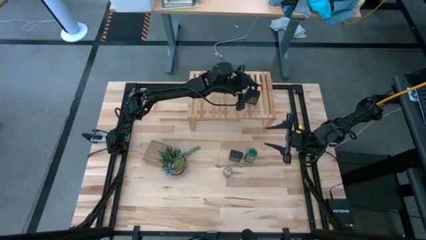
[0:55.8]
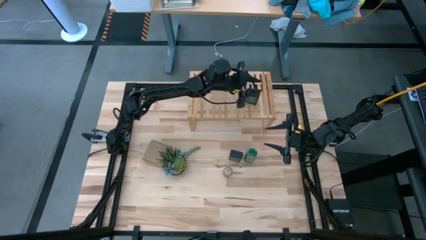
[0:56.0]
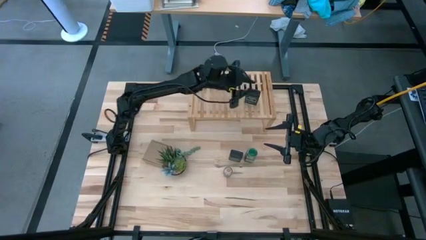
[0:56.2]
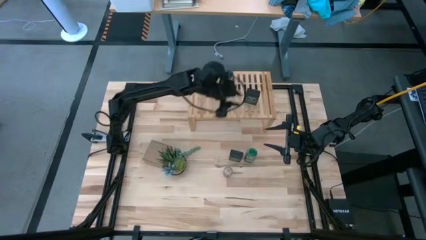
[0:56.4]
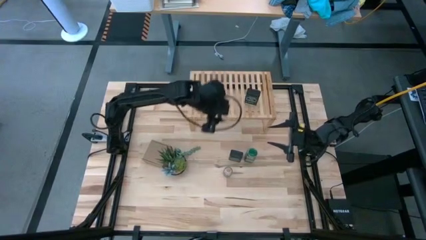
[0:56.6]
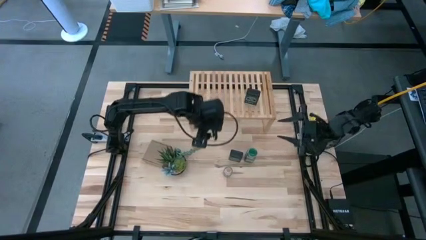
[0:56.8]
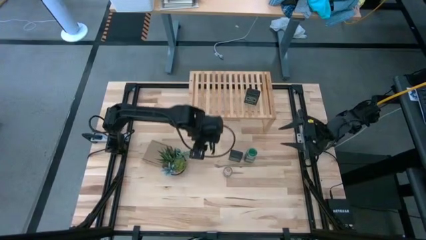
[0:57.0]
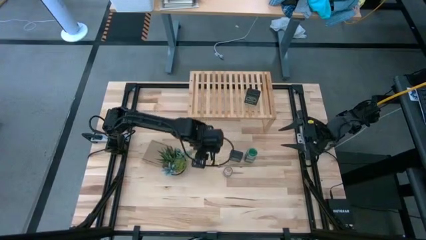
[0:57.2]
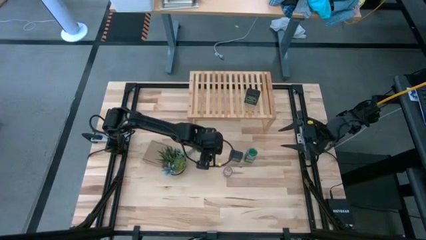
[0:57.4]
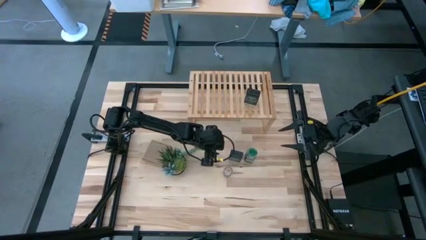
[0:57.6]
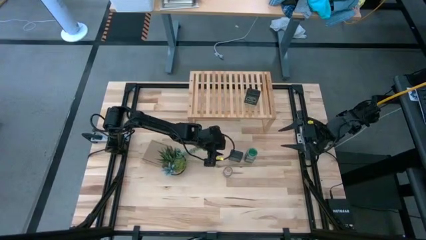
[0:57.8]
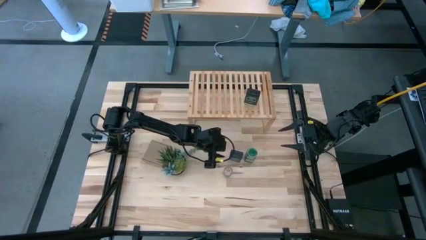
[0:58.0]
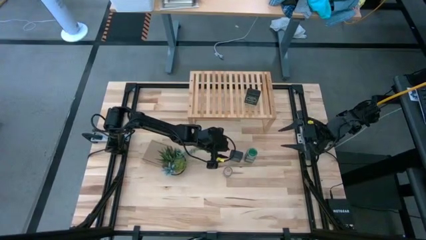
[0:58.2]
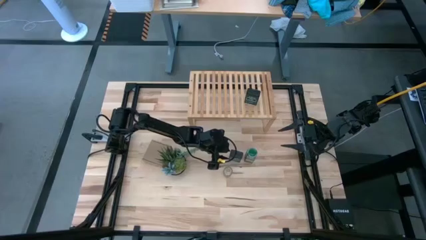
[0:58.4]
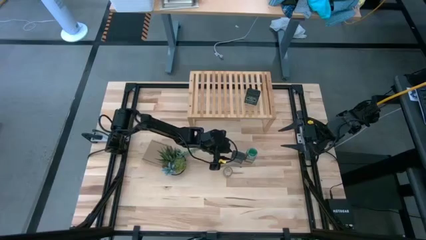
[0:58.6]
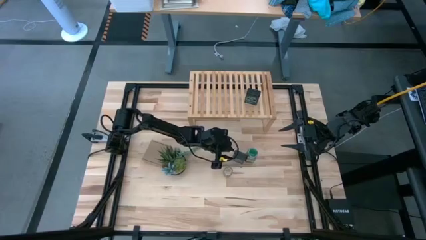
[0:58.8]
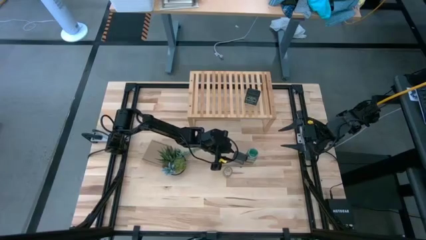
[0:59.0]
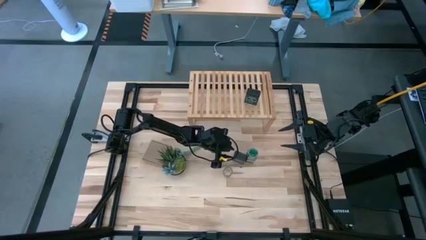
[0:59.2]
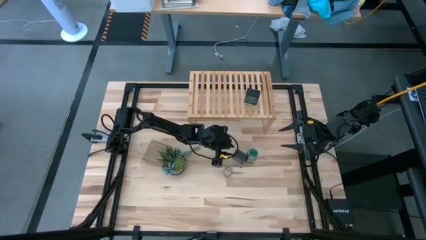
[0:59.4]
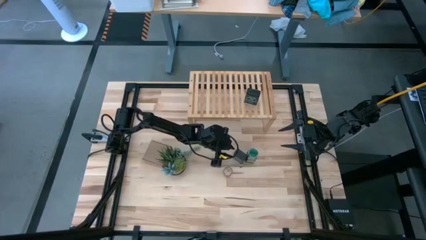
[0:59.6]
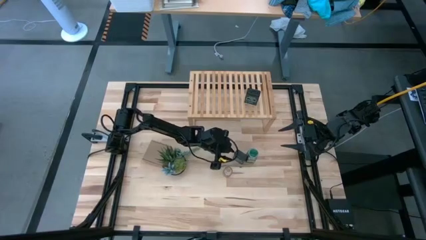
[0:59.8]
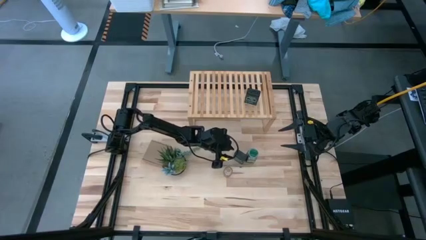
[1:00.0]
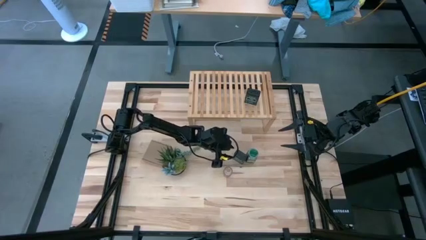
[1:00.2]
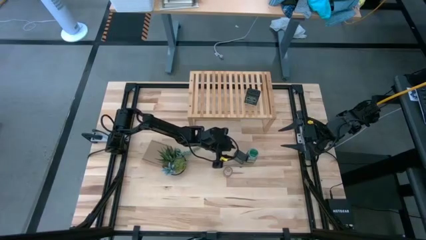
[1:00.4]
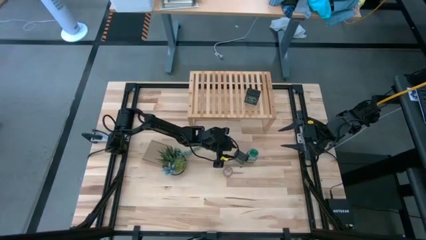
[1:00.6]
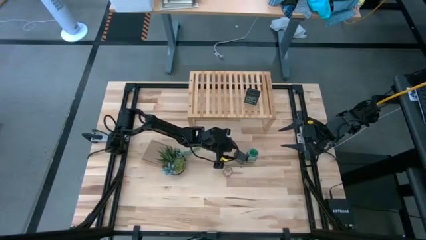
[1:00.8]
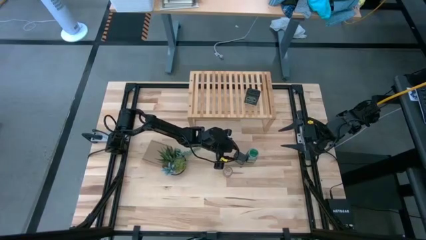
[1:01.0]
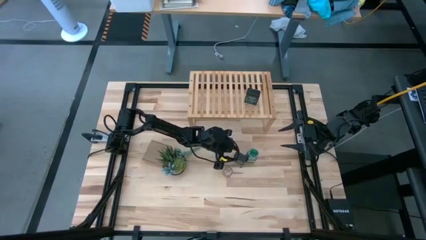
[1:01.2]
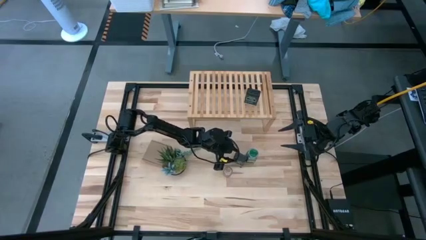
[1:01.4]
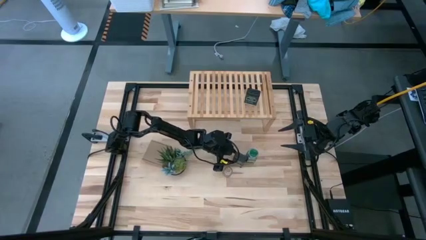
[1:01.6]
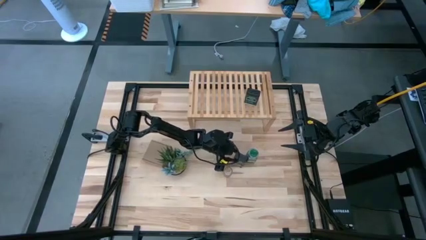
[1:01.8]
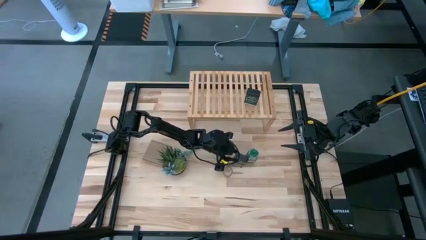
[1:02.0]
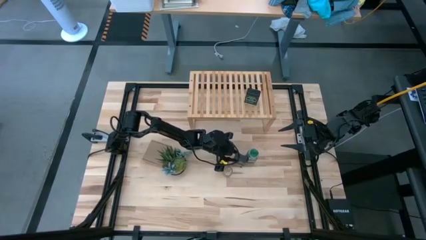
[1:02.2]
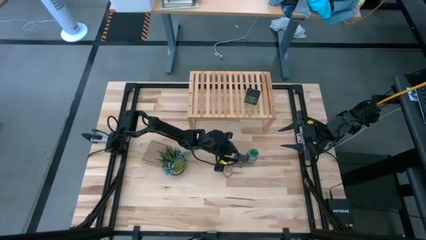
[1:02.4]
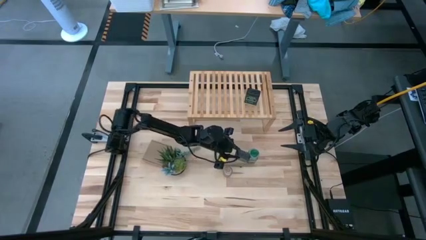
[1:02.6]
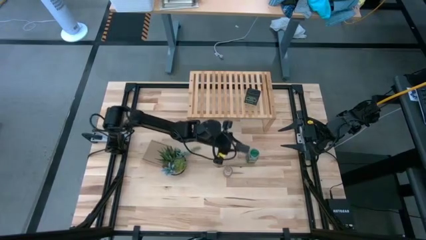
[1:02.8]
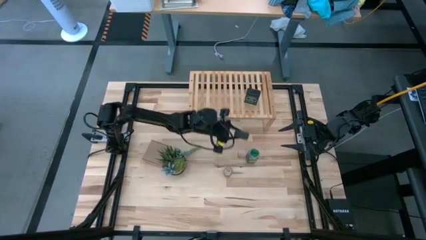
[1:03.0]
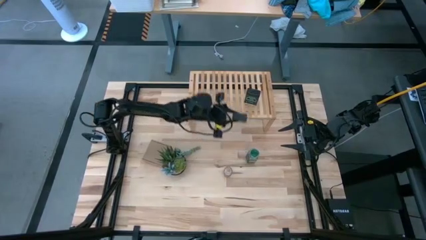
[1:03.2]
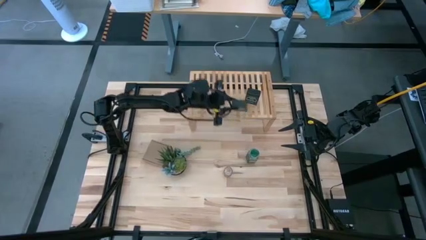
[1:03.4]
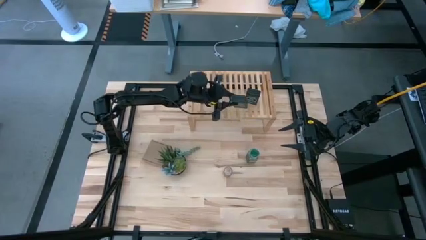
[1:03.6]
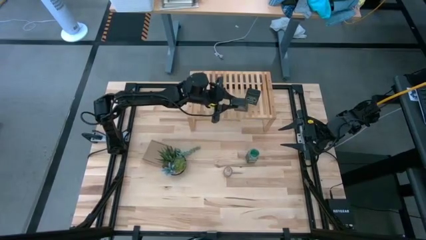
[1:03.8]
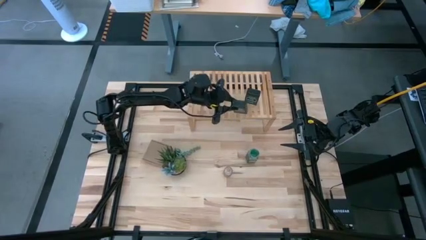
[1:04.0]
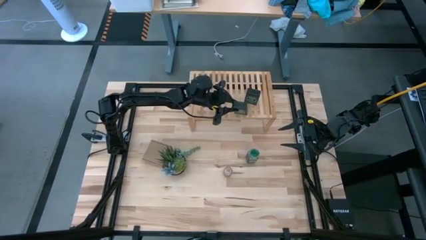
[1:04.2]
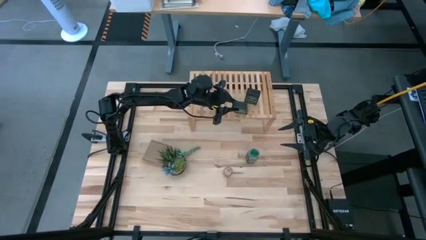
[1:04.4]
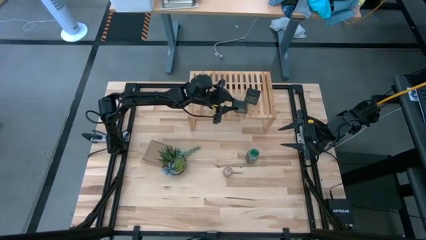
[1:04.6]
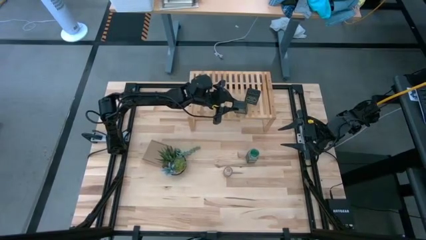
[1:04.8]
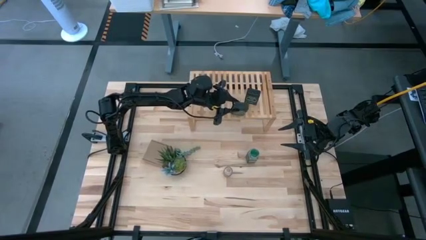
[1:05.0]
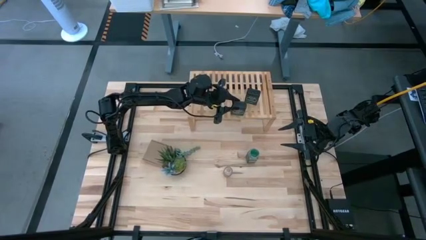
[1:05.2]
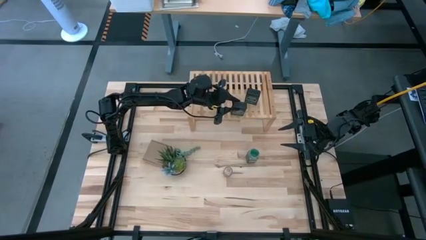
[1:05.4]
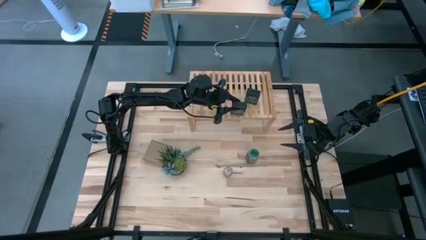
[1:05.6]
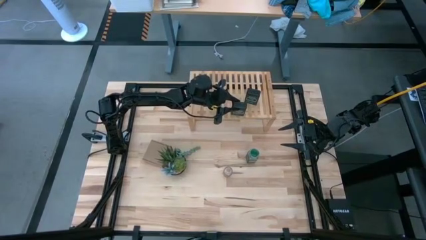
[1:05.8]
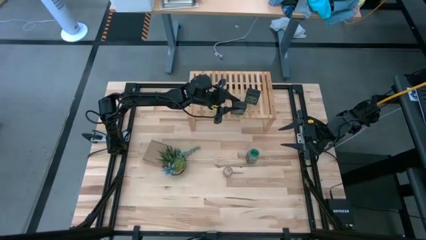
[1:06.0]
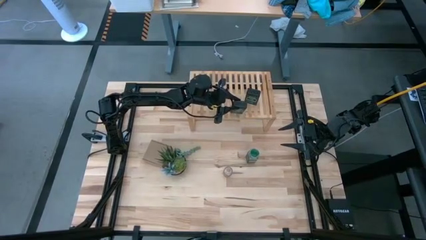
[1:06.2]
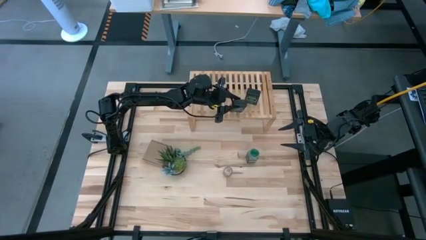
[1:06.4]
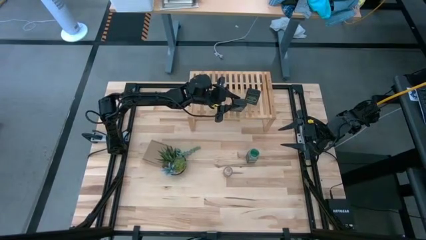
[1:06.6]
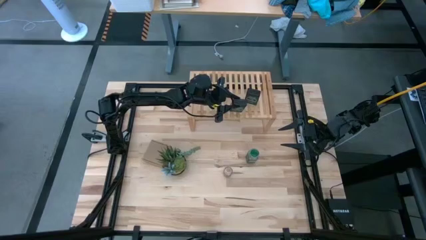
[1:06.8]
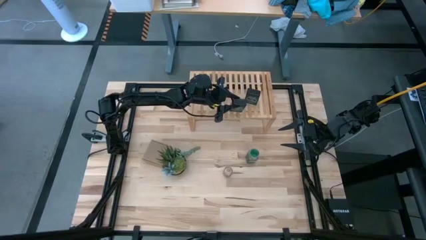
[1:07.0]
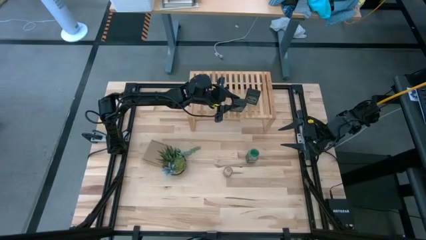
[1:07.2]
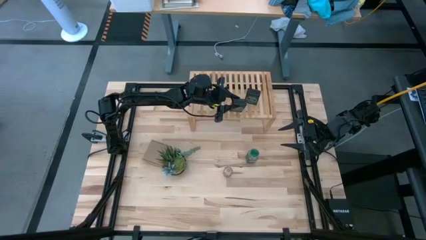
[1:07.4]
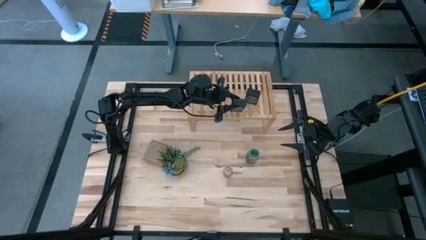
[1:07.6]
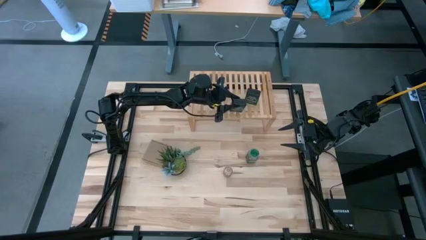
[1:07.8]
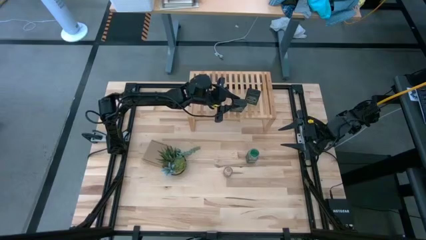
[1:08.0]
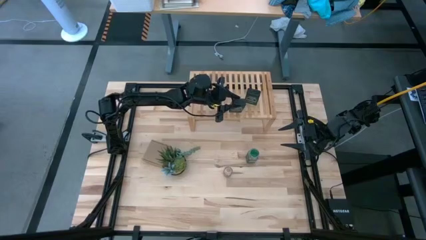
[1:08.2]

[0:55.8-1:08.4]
Task: Shelf spices
Put the green seasoning can on the shelf

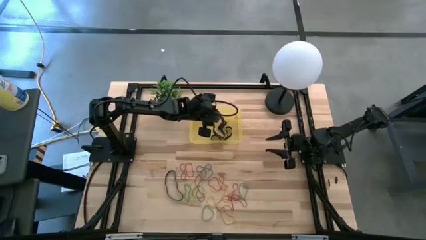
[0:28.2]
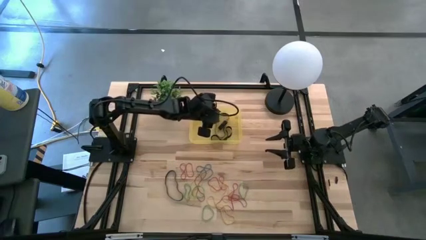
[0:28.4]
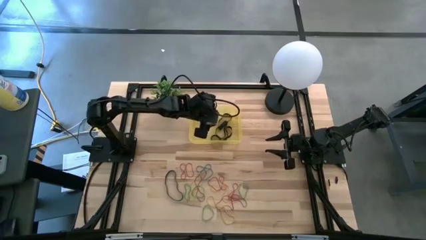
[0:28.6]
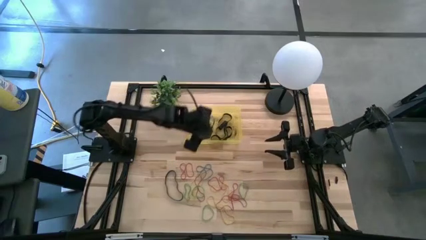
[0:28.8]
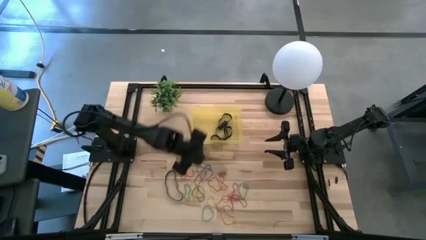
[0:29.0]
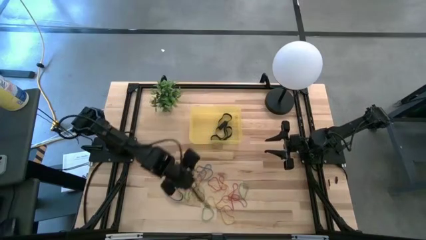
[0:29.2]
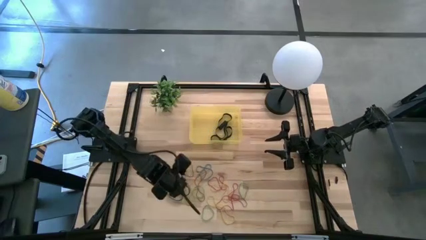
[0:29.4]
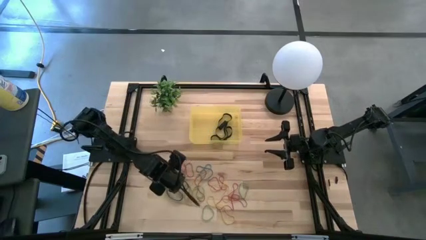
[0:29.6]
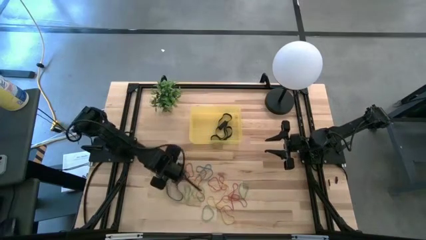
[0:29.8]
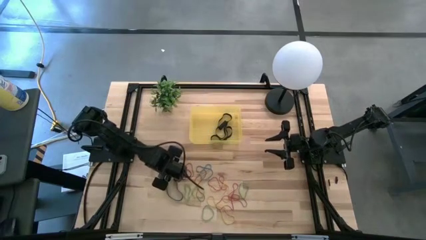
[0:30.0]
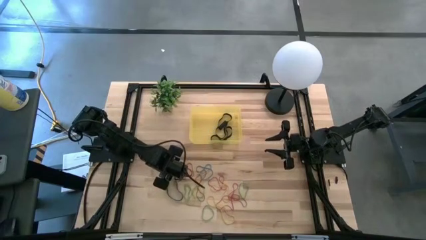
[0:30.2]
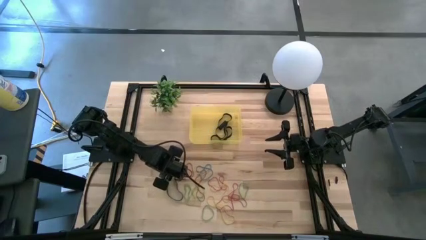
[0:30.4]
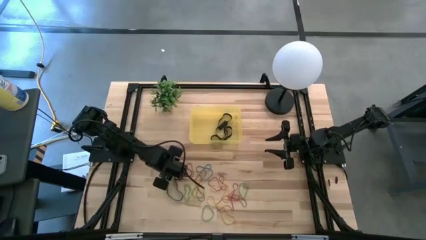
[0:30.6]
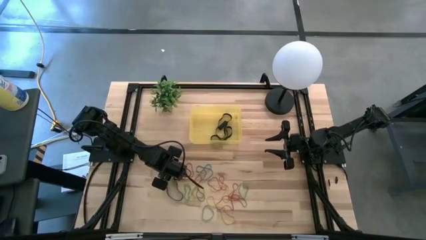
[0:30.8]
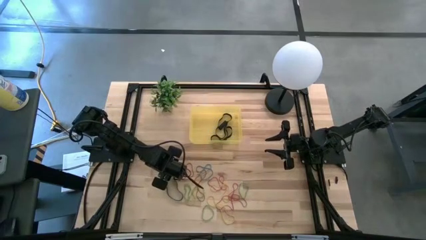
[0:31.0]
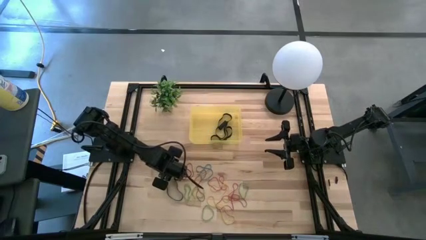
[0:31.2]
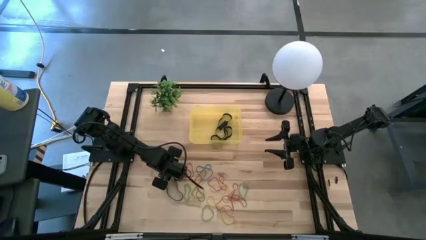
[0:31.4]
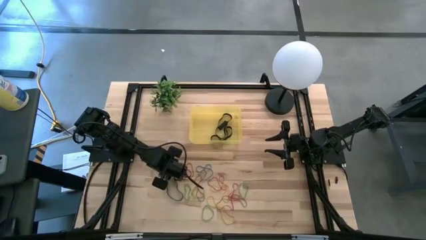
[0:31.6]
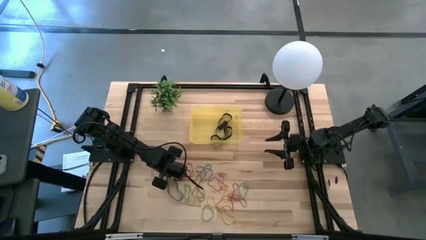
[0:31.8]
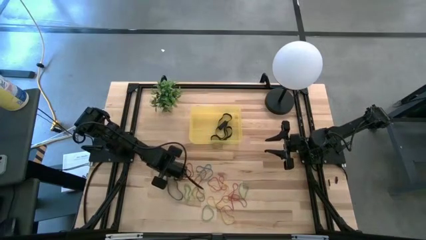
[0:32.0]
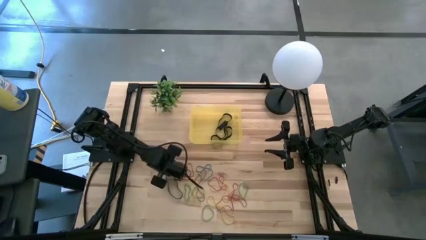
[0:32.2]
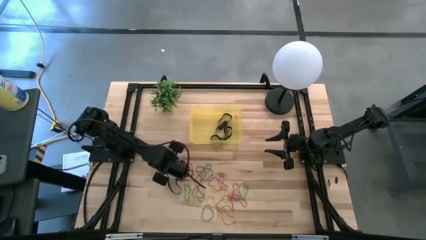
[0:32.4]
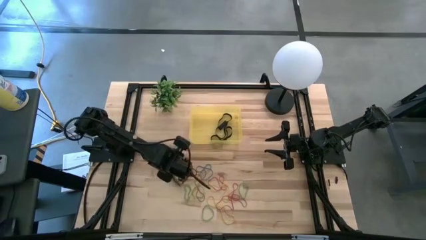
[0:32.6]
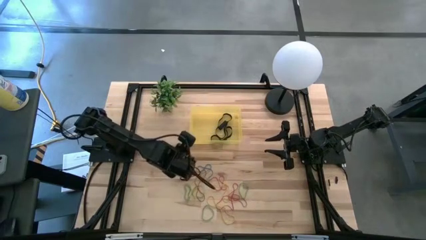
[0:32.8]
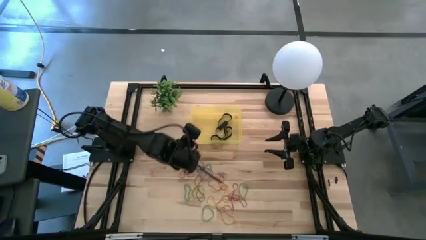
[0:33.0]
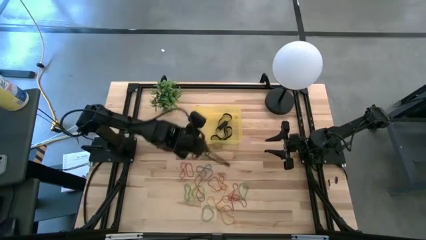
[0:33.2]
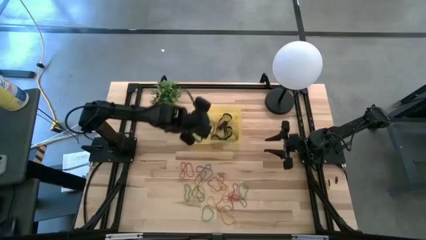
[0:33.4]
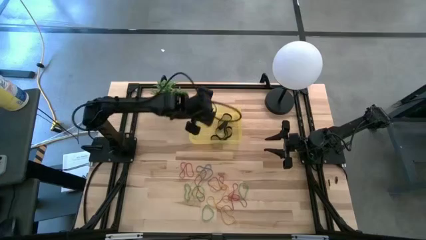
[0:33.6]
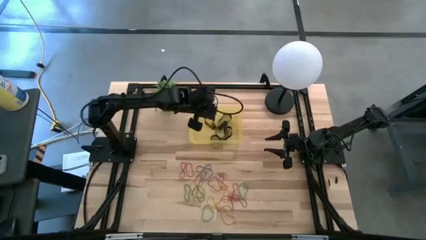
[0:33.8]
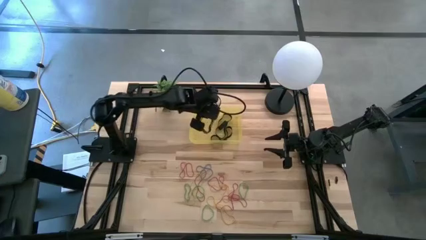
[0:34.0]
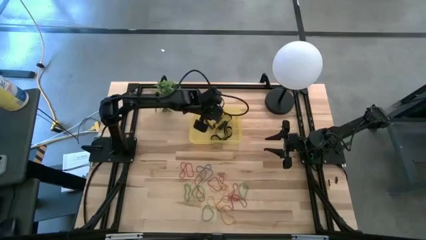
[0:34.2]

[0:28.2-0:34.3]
Task: Pick and place rubber bands into bin
Put the black rubber band into the yellow bin
